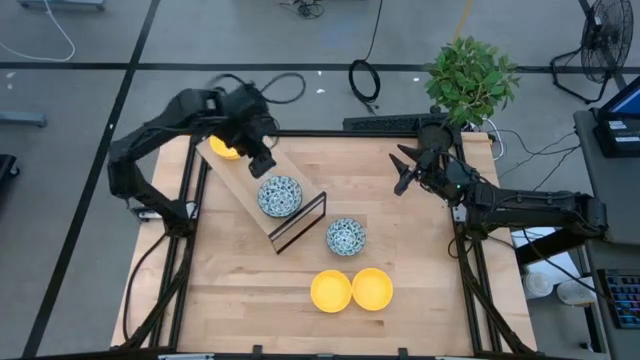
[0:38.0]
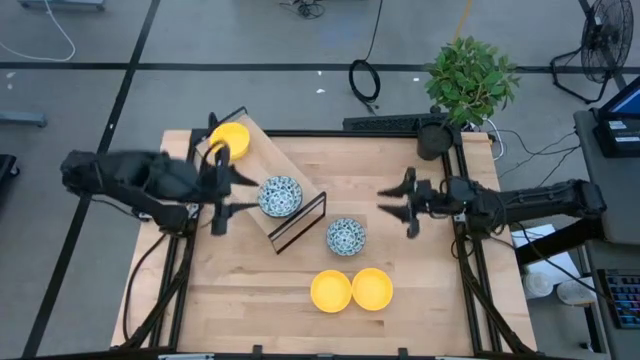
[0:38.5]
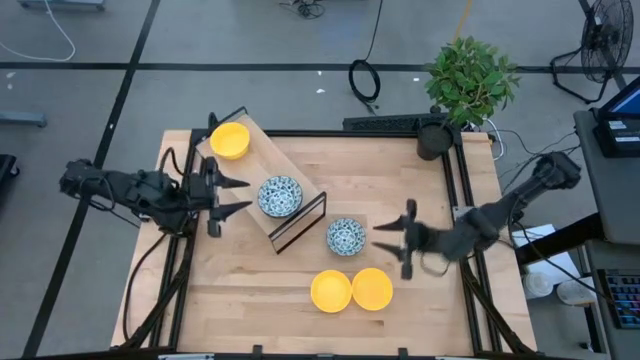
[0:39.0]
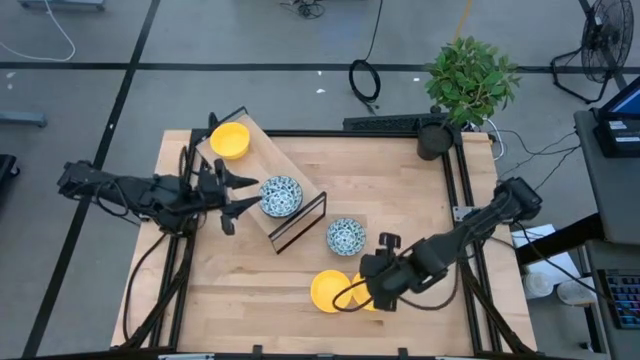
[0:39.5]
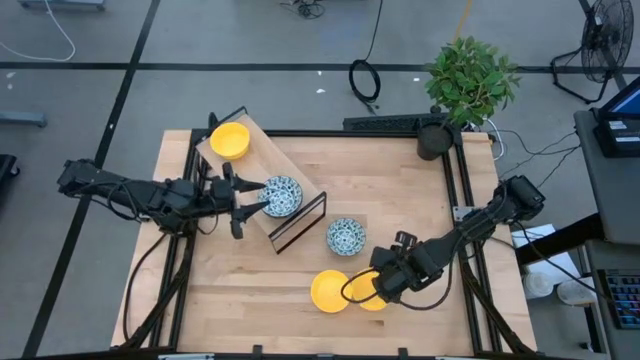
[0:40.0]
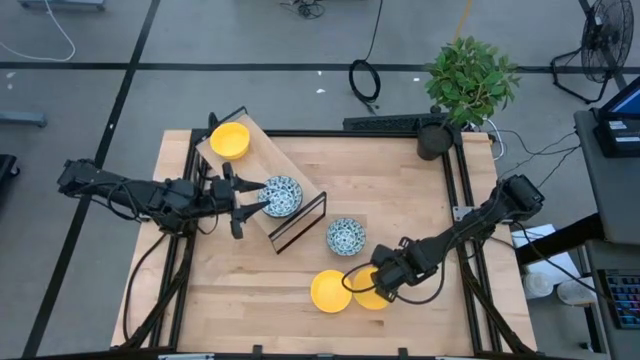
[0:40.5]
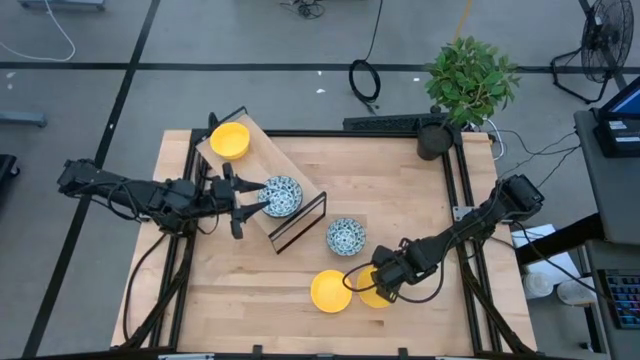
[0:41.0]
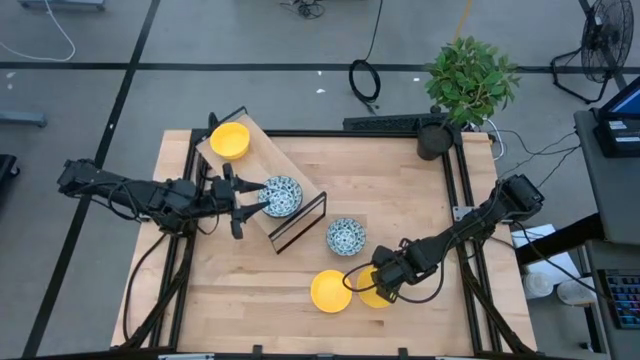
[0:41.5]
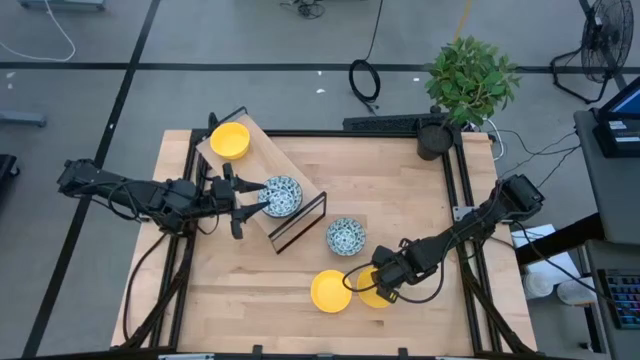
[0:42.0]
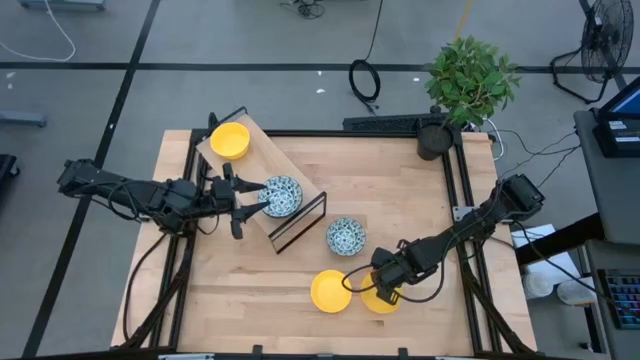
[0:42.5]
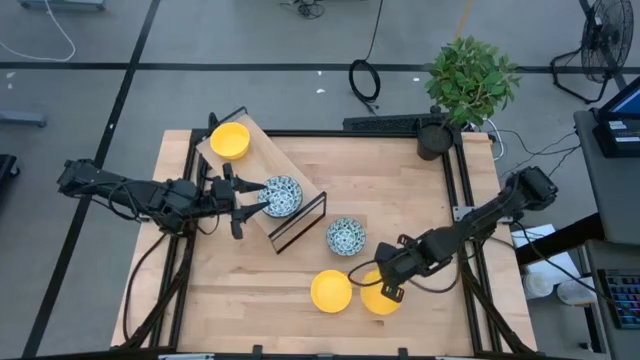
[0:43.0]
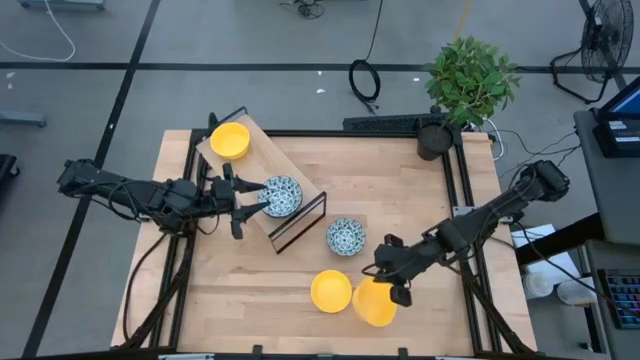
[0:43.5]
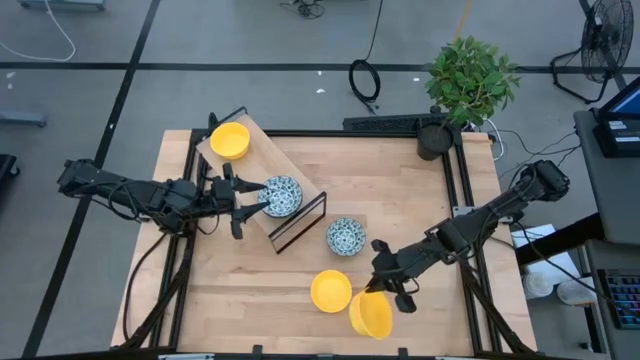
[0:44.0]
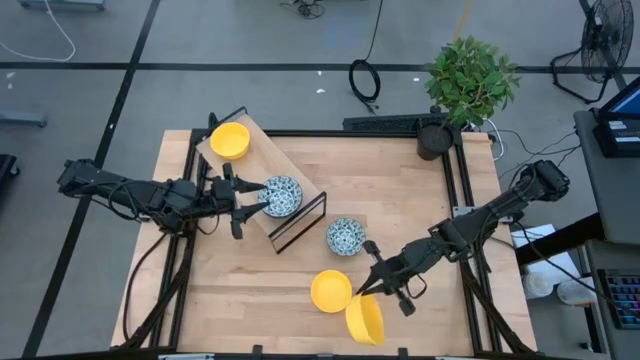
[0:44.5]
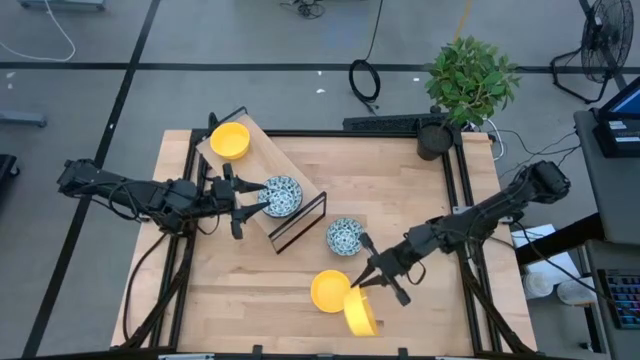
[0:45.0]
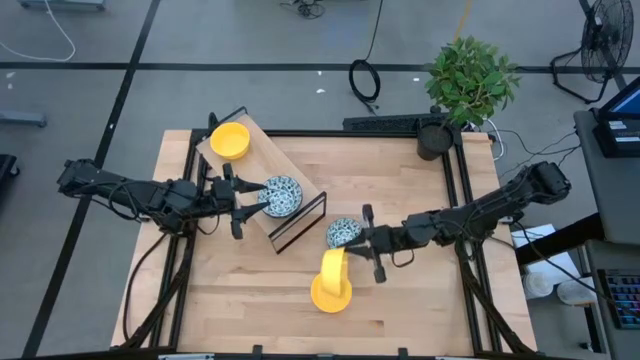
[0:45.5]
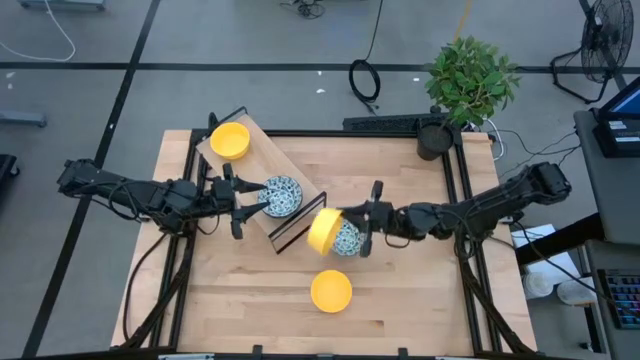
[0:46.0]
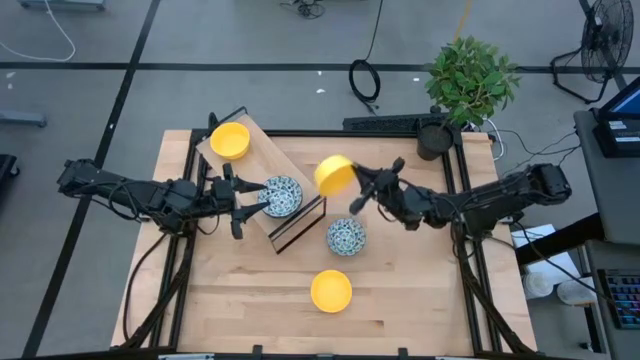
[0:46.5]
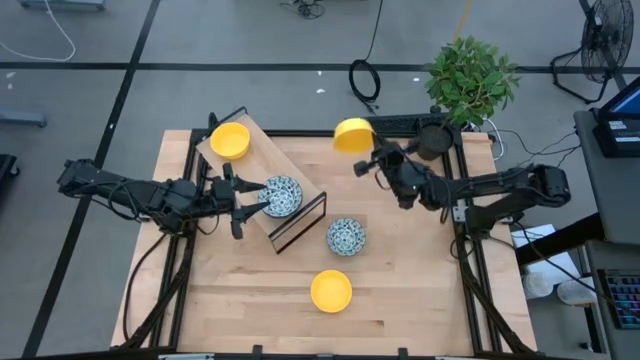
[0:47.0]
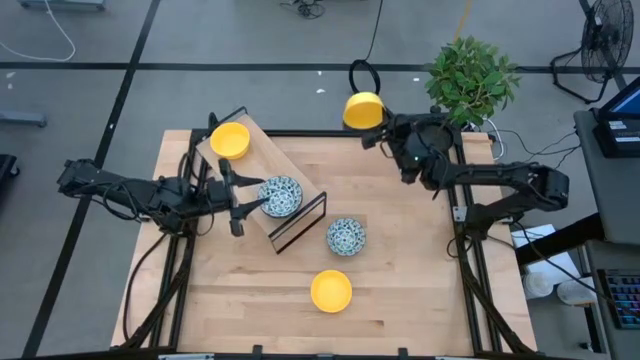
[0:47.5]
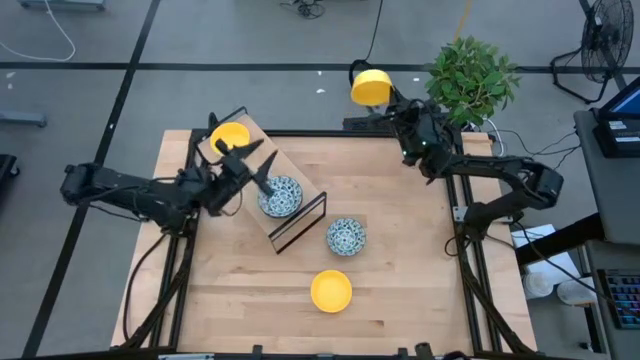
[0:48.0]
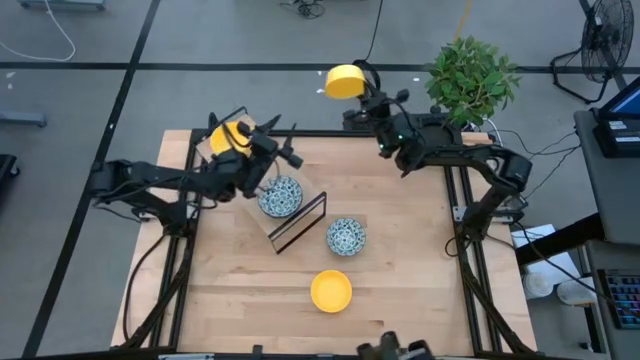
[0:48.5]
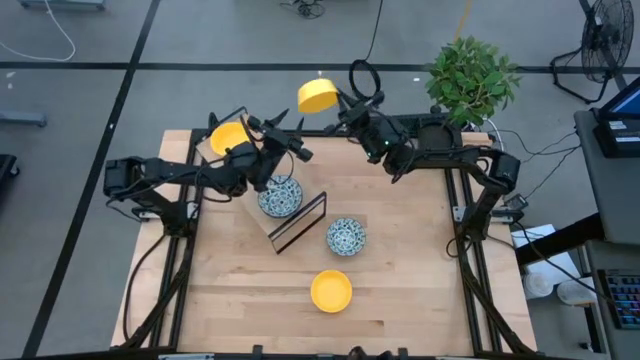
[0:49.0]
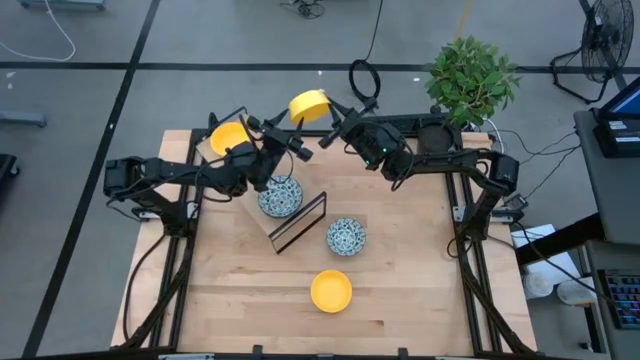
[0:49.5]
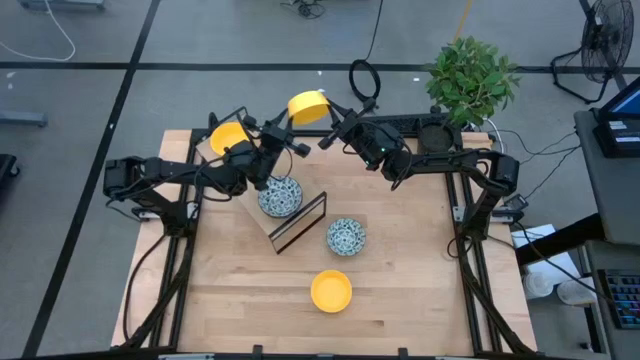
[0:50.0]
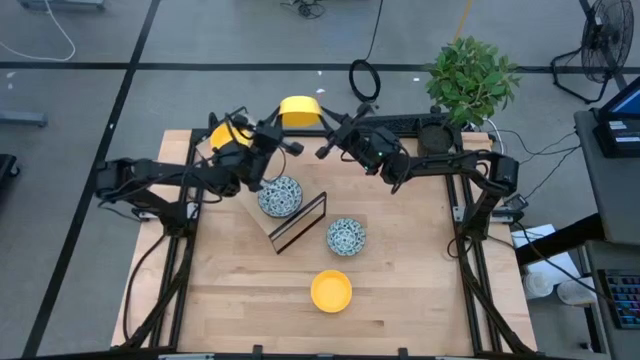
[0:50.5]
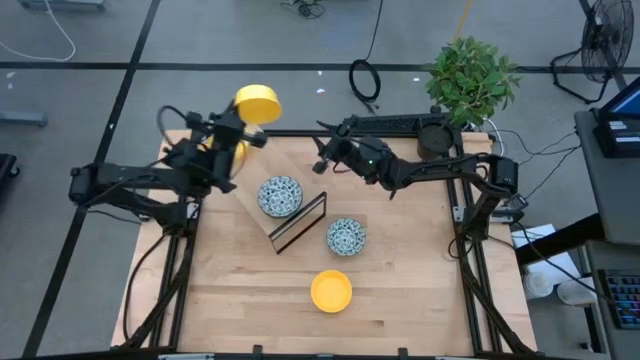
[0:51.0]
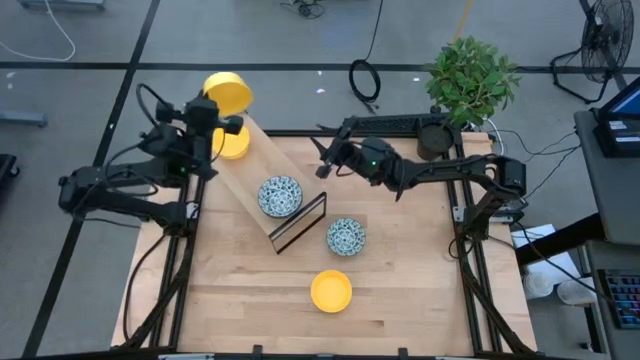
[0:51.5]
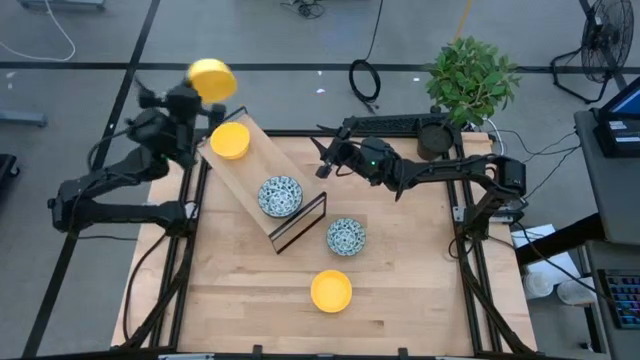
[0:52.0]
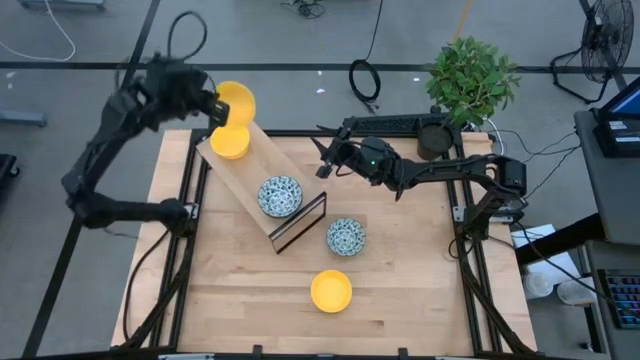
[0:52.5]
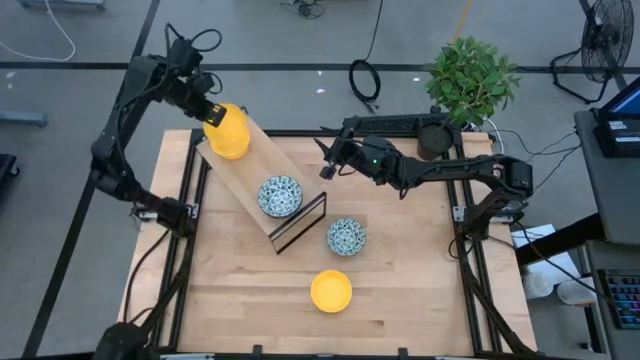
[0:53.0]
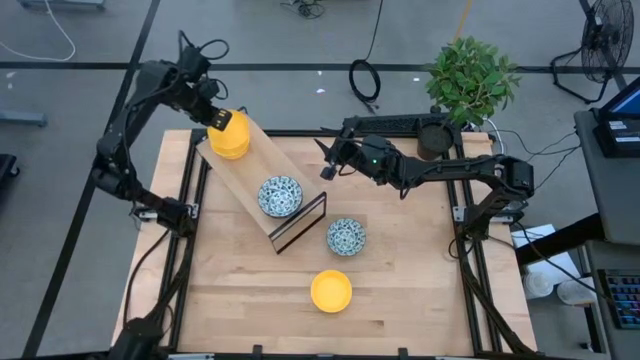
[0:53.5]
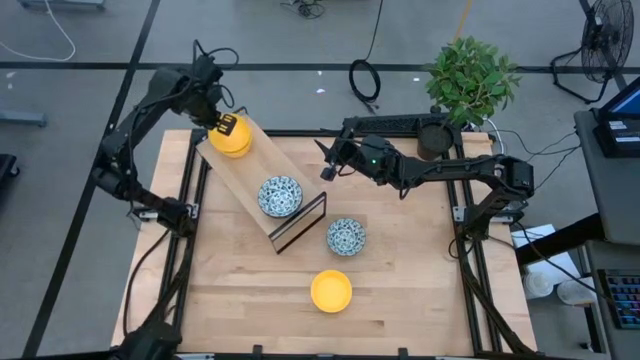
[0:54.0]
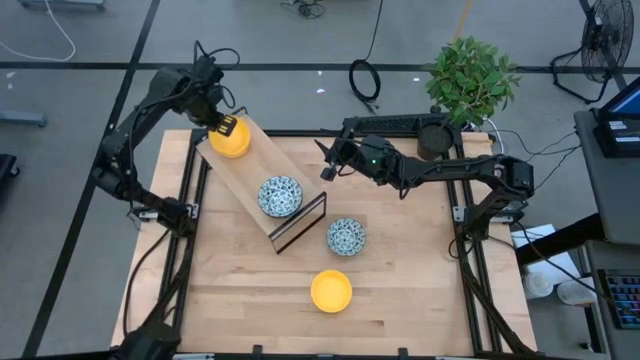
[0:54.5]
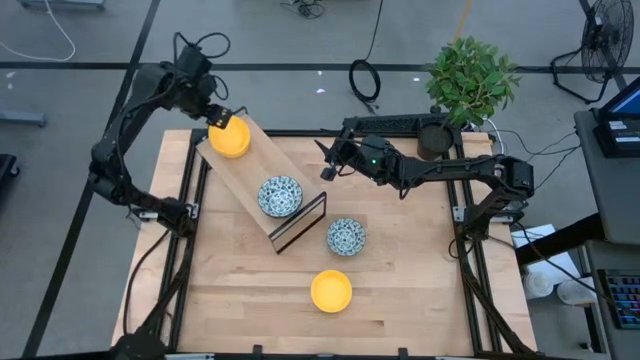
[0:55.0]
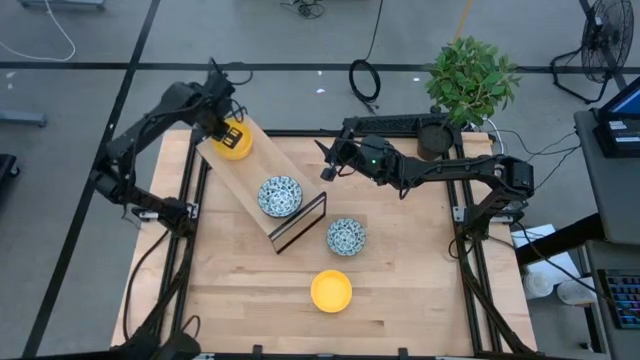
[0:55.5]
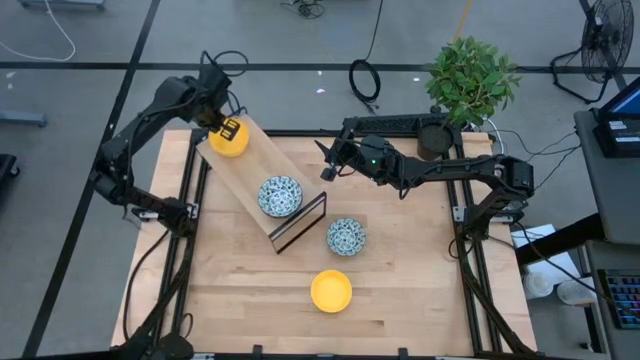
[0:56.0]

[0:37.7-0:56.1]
Task: Pick & Place Mini bowls
Stack the right yellow bowl on the yellow bowl on the shelf

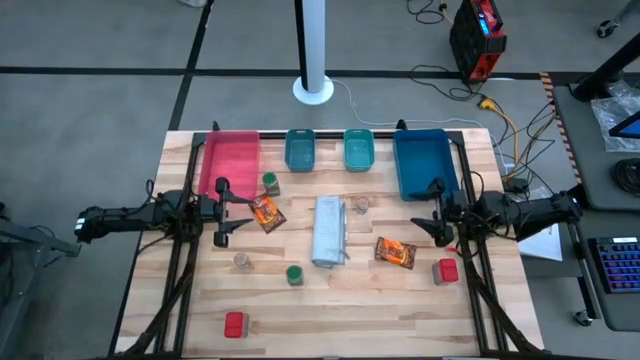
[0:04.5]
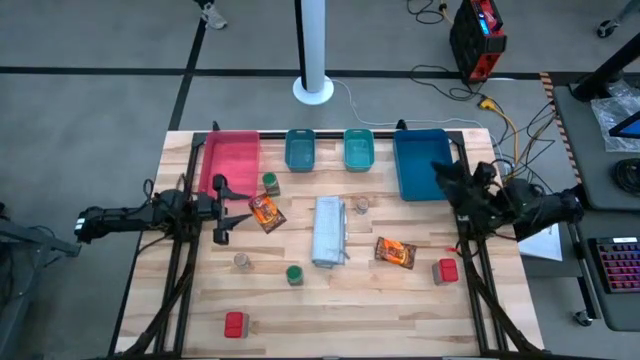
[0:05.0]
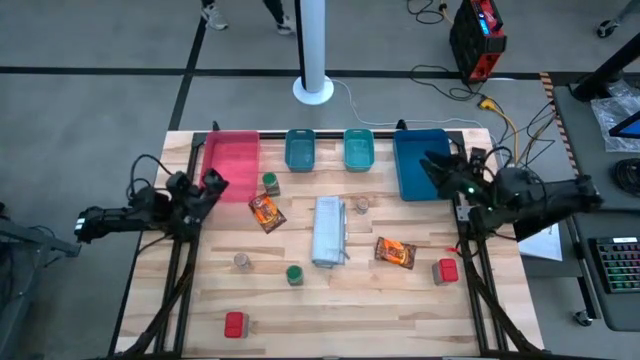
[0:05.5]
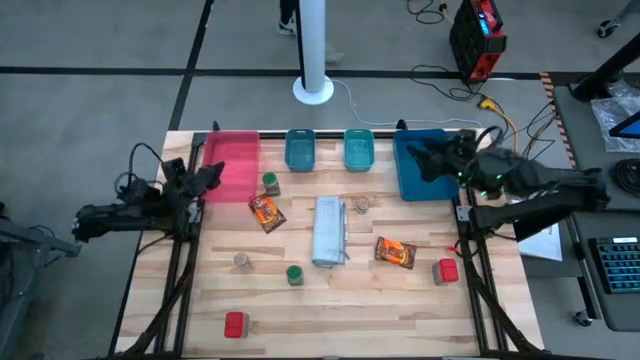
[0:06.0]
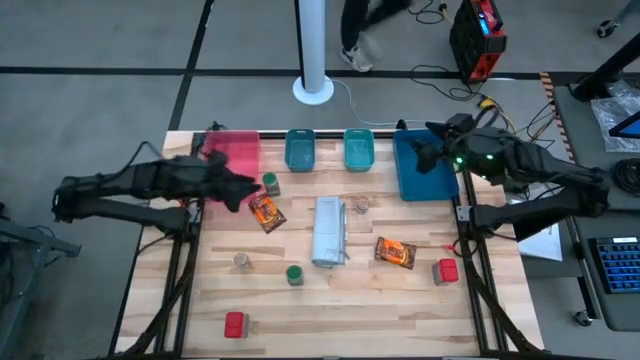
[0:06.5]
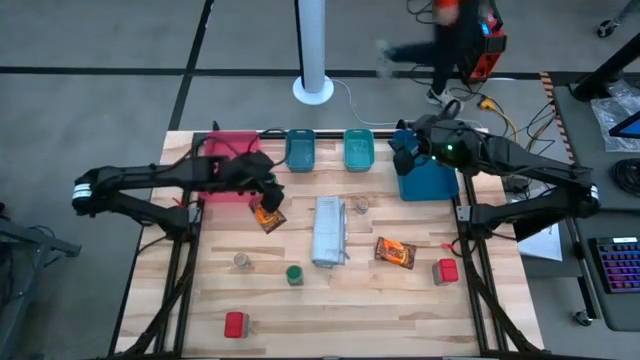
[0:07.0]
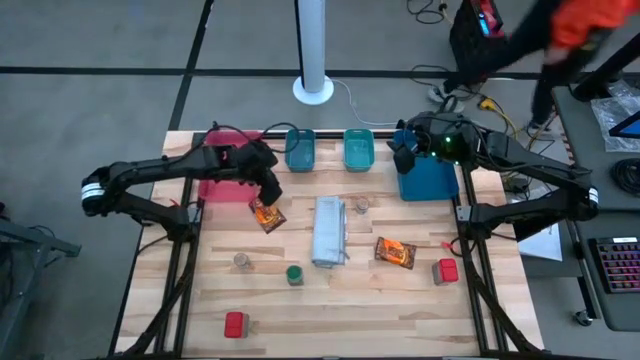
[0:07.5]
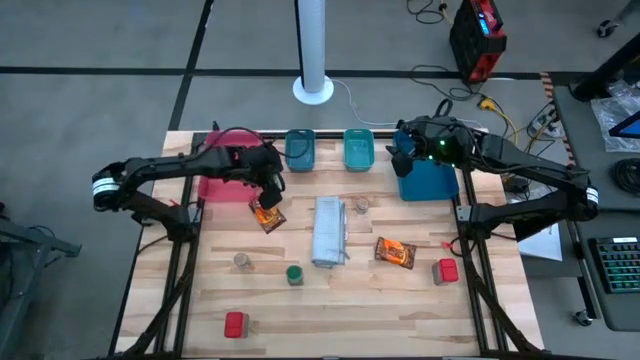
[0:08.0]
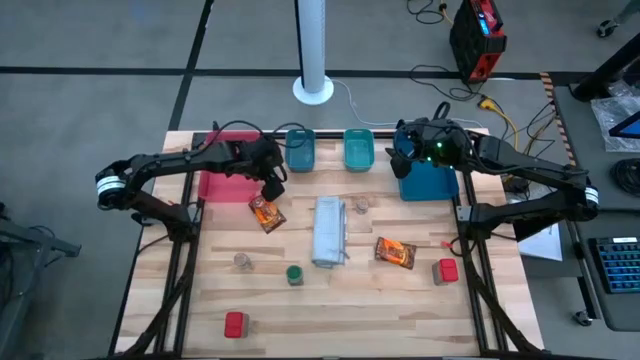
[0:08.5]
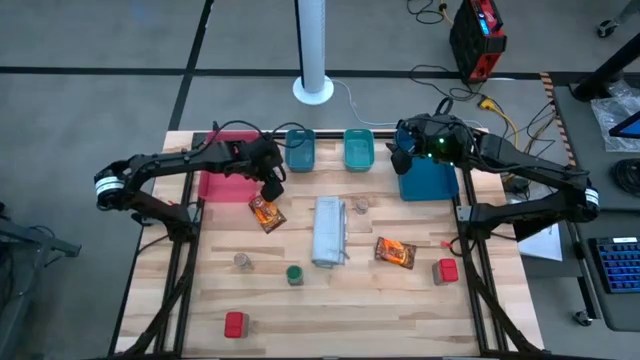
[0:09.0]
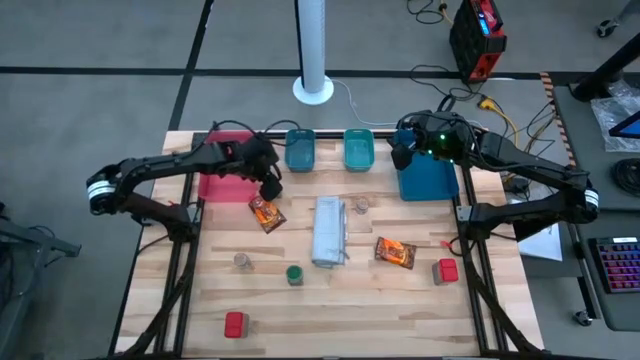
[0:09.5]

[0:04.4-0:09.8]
Task: Sort spices by type
Put the top green seasoning bottle into the pink bin
